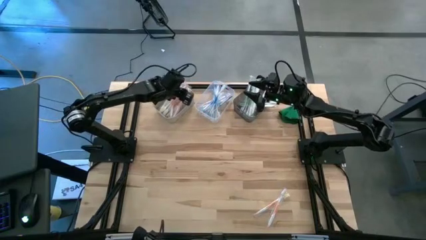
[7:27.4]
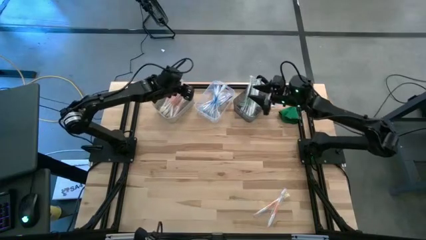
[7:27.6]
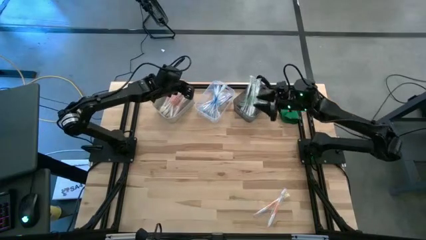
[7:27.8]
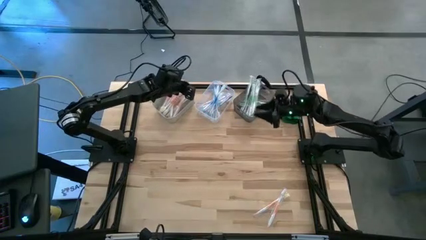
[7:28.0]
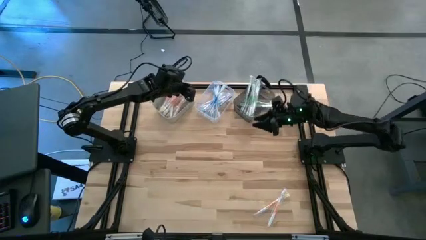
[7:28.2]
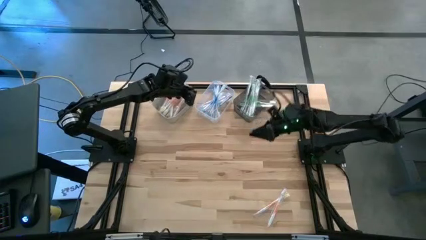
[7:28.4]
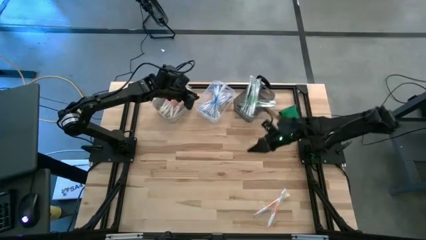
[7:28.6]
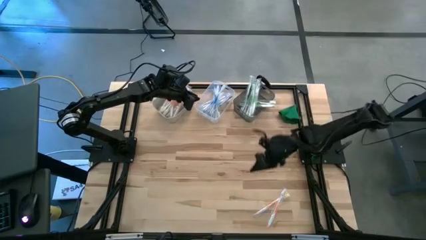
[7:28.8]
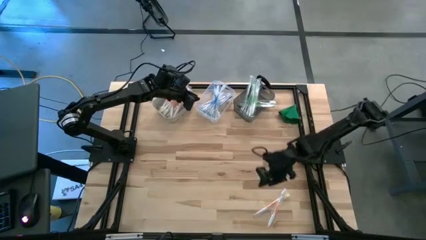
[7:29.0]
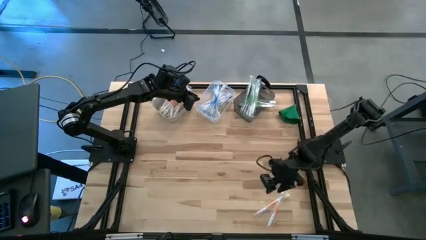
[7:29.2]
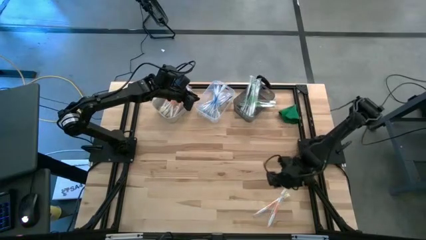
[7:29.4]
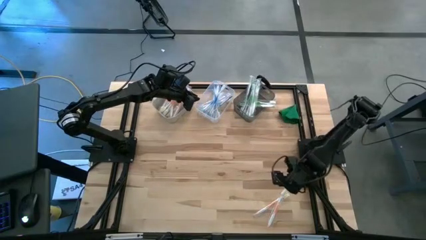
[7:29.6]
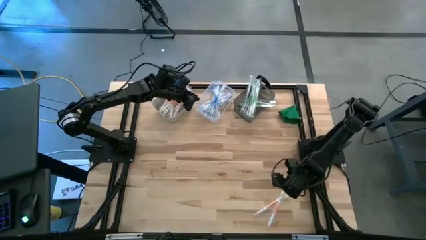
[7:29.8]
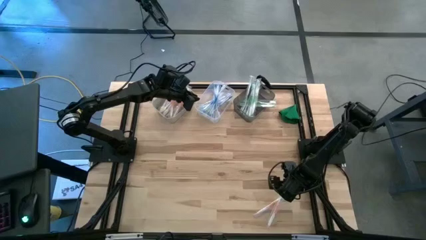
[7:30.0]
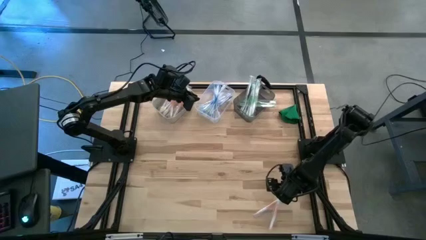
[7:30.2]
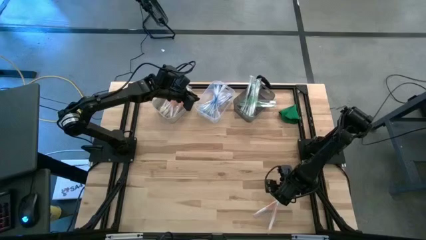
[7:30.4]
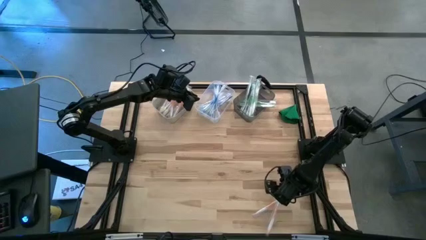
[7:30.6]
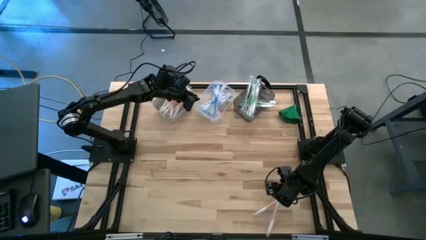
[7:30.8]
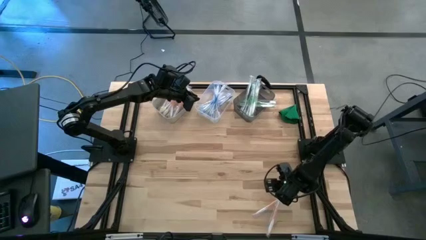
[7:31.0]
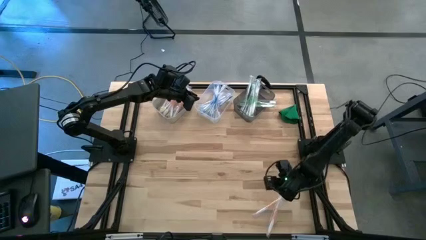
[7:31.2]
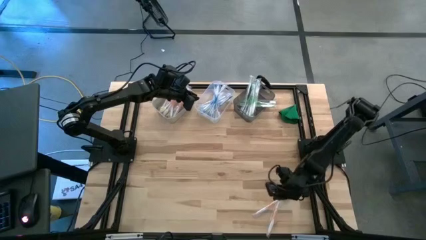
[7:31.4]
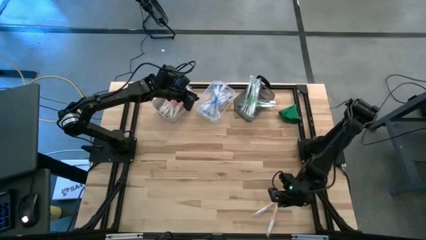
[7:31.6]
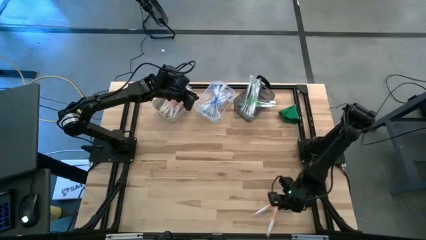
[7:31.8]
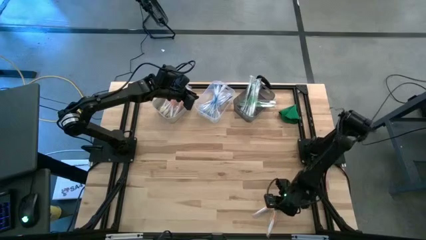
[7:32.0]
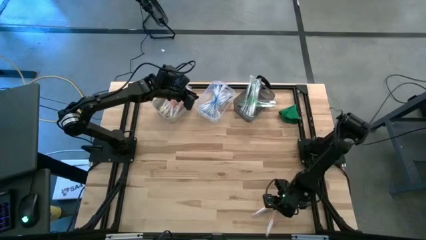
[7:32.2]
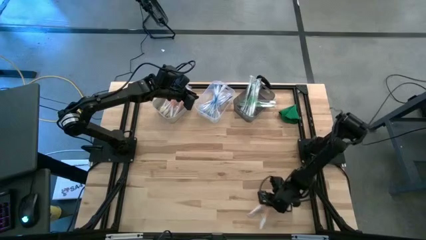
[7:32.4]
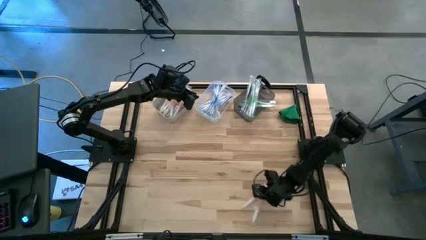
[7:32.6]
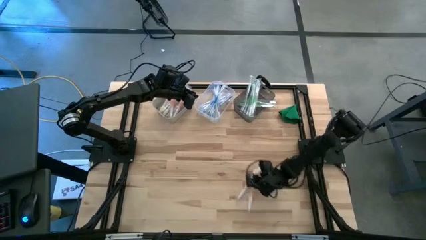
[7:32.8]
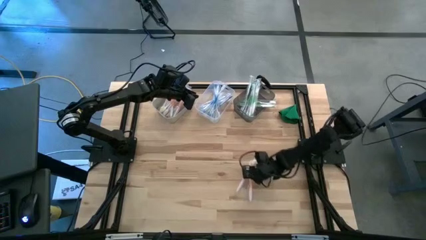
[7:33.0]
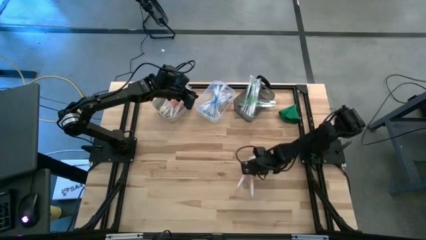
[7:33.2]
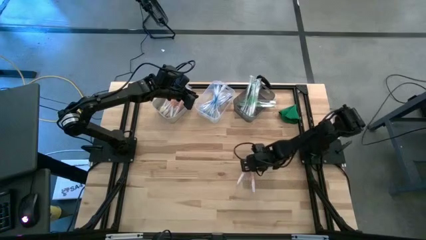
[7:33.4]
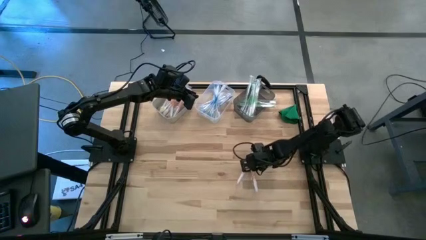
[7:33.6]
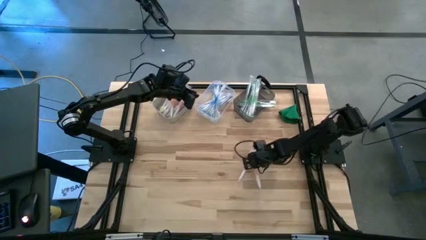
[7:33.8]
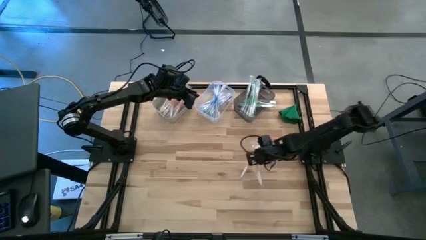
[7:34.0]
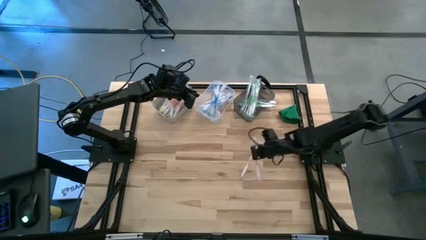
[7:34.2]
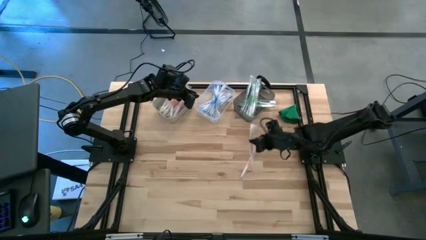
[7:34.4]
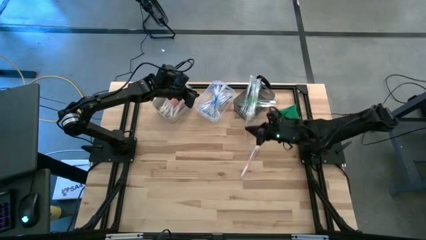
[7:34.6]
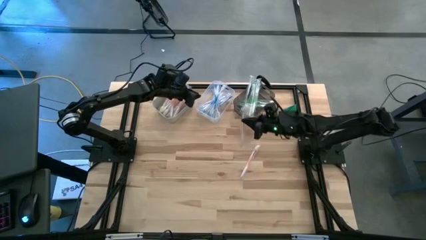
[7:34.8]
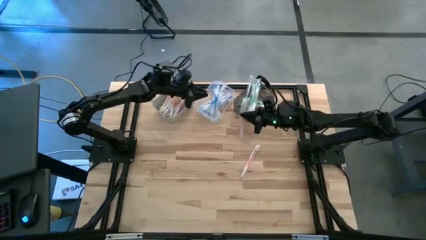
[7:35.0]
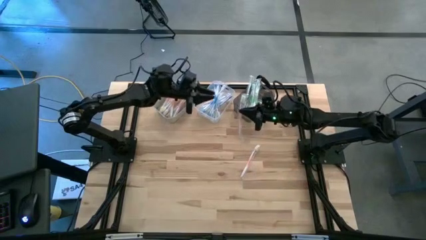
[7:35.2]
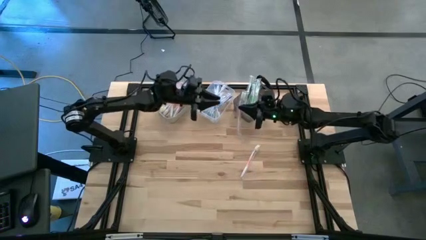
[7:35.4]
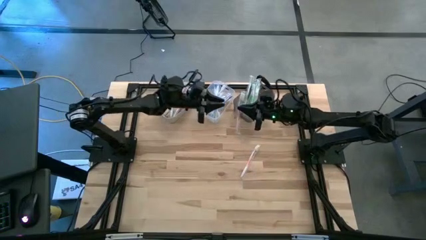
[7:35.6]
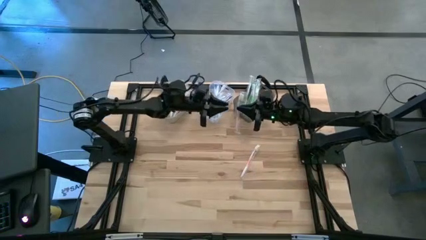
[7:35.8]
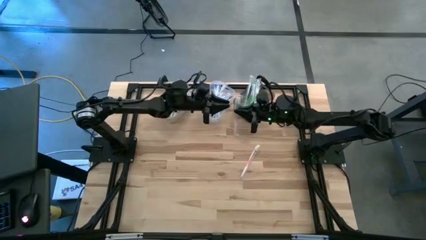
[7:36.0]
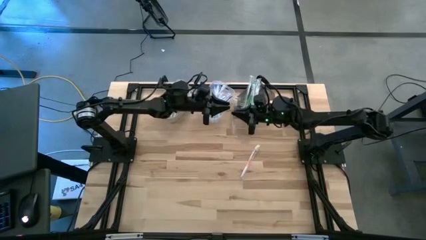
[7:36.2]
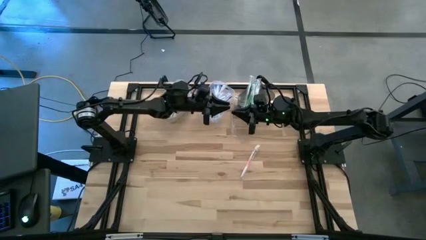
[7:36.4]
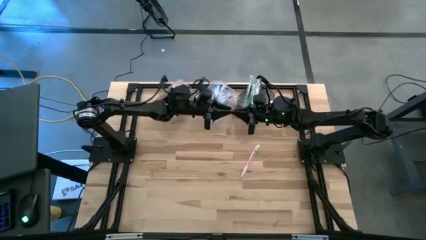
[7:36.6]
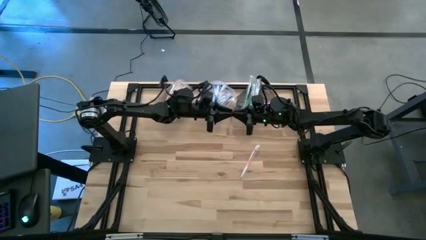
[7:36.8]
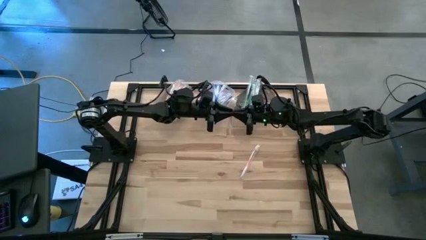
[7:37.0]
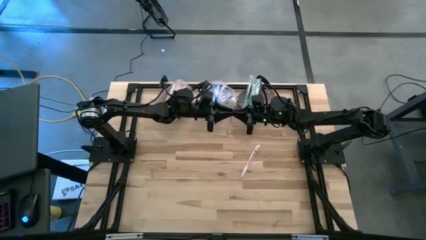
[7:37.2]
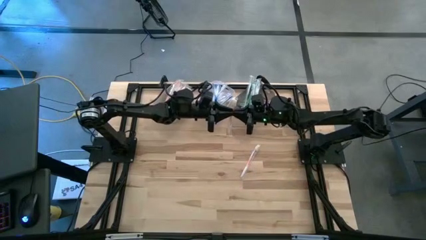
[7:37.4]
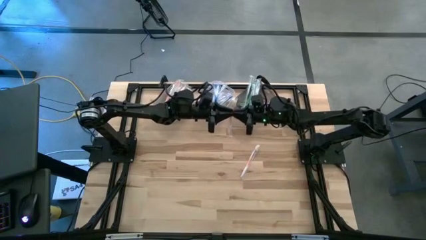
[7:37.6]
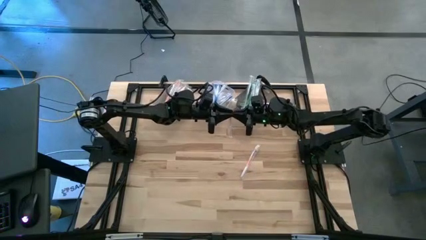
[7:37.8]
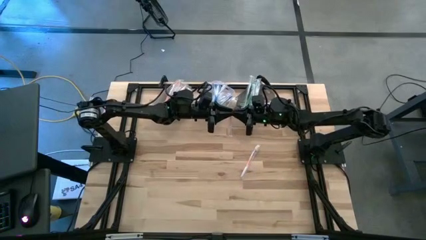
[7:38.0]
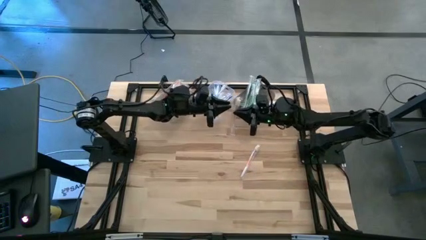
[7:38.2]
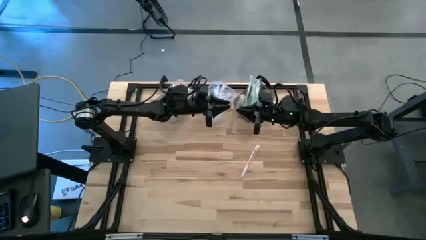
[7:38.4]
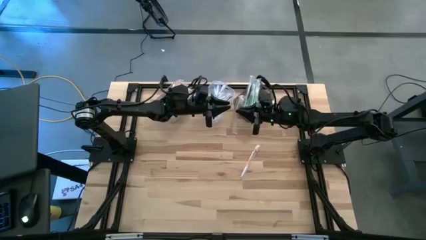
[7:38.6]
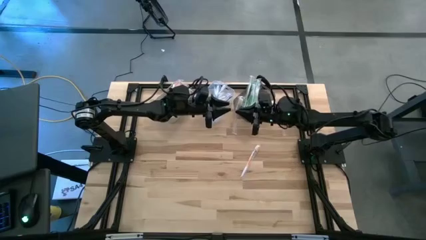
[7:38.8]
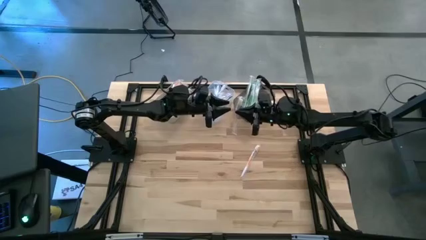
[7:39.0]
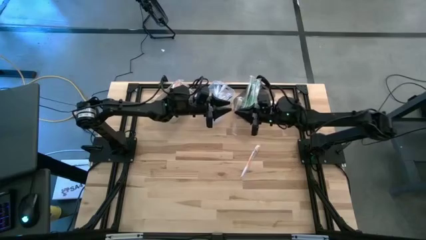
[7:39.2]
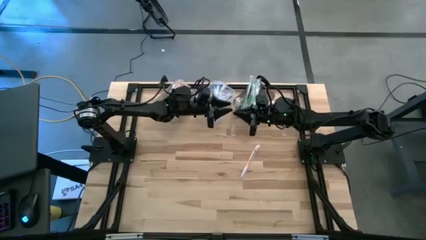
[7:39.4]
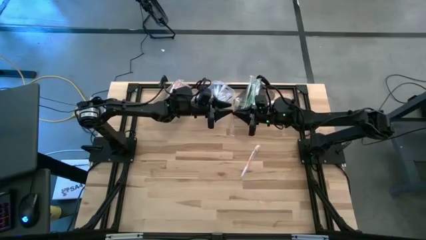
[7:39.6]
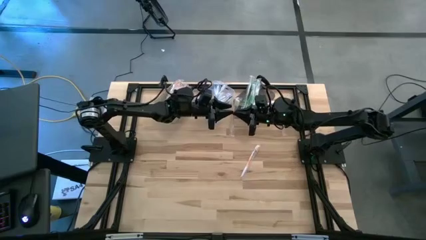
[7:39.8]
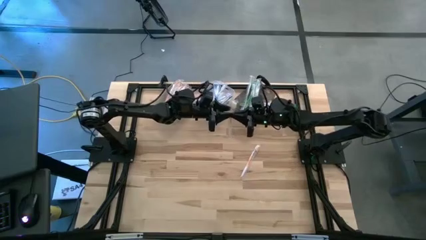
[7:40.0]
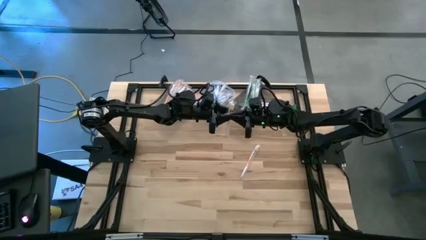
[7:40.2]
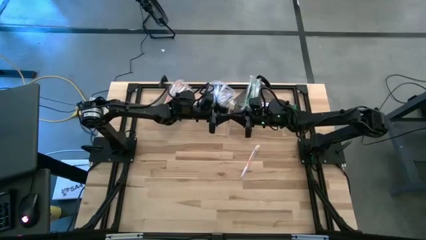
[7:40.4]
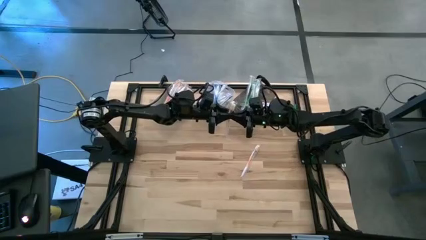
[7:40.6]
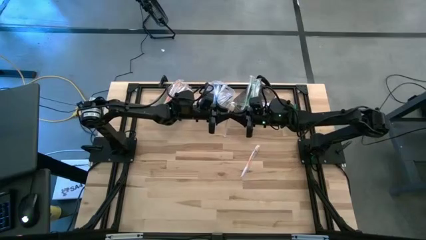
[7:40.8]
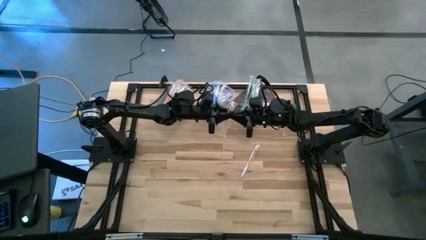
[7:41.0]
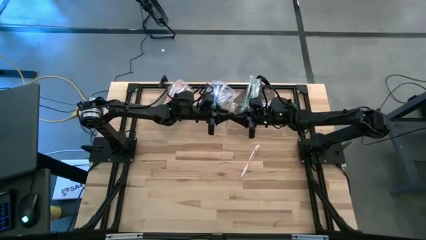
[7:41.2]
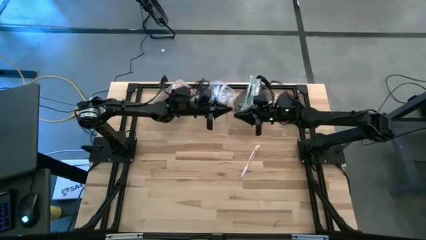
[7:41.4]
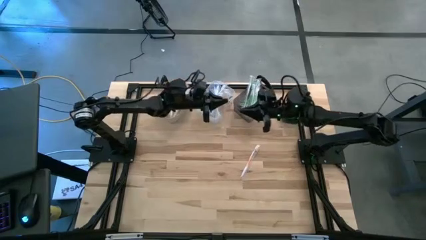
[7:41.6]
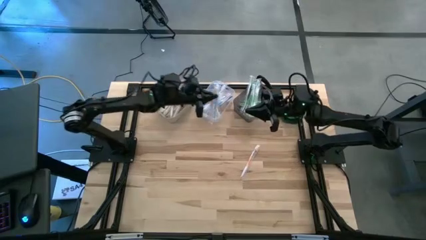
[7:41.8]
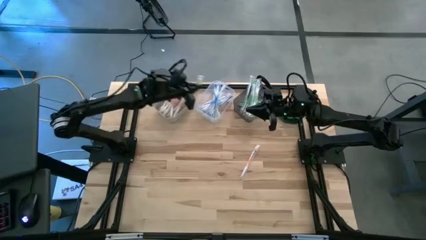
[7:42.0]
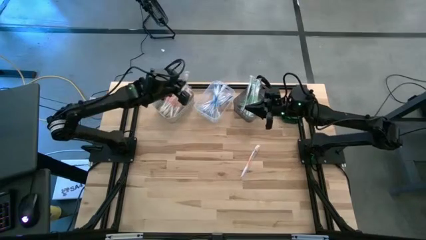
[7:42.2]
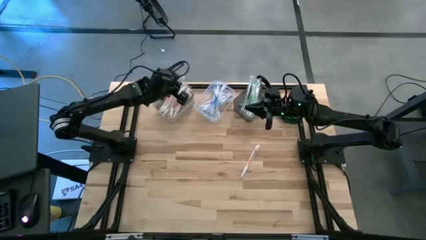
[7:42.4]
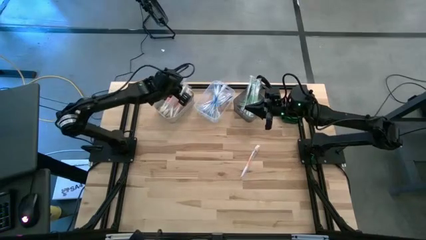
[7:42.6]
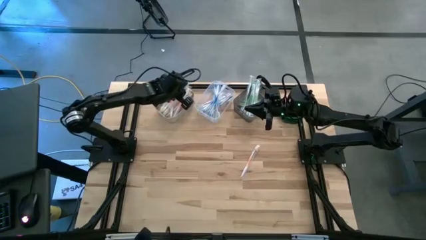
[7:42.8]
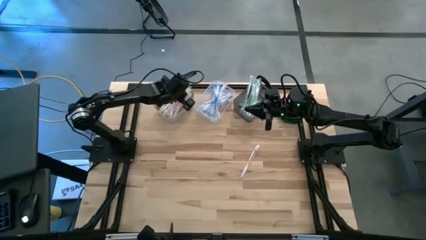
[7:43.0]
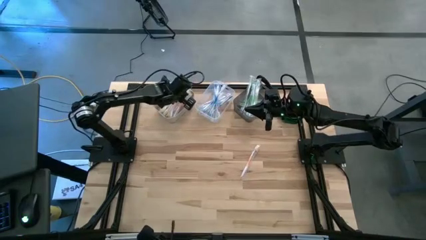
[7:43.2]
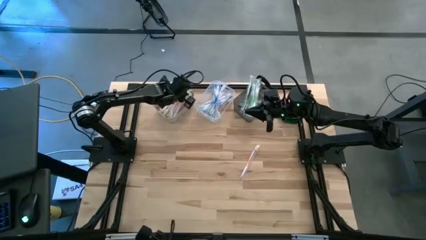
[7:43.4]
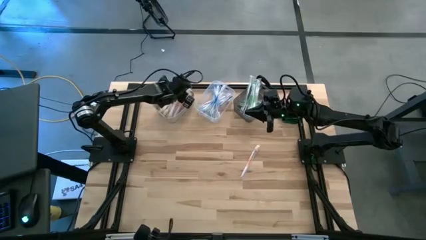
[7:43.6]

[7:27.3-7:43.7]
Task: Pick & Place Toothbrushes
Put the orange toothbrush into the white bin

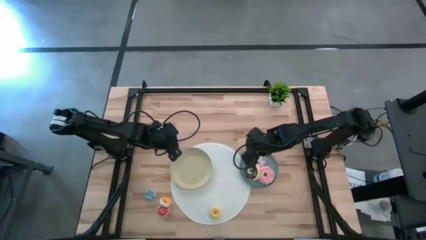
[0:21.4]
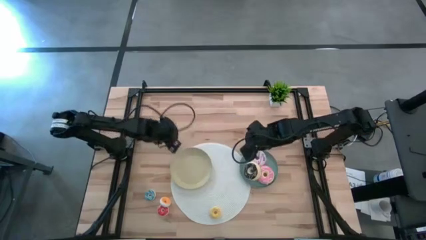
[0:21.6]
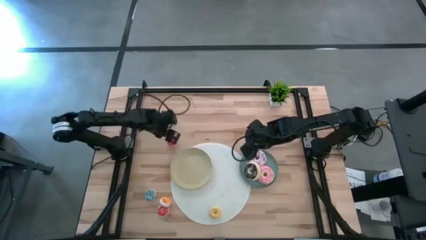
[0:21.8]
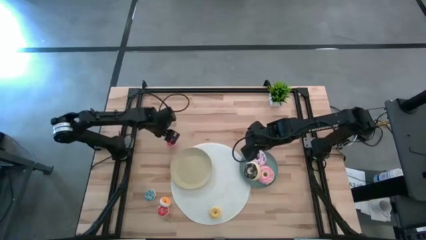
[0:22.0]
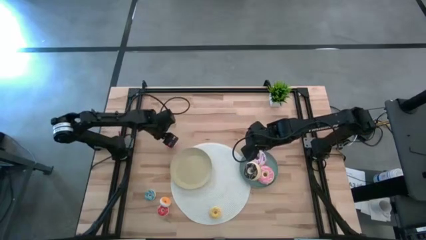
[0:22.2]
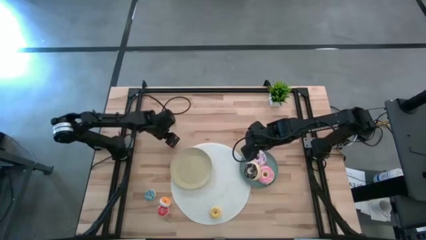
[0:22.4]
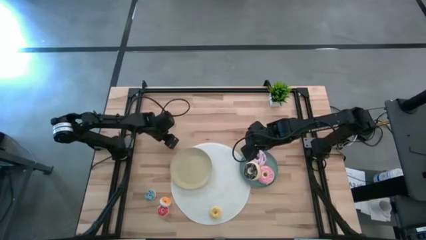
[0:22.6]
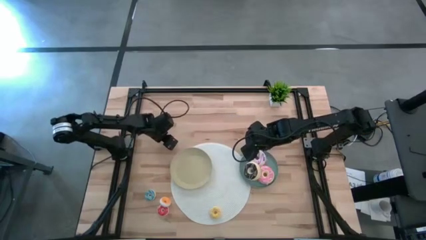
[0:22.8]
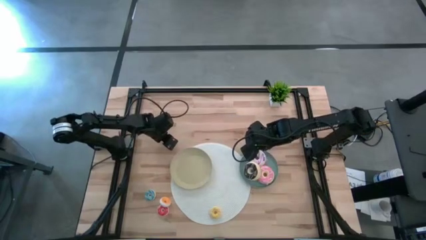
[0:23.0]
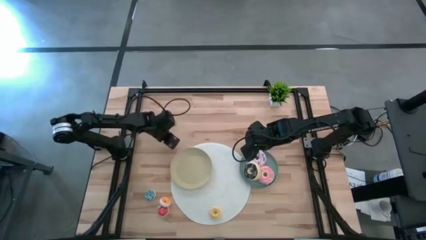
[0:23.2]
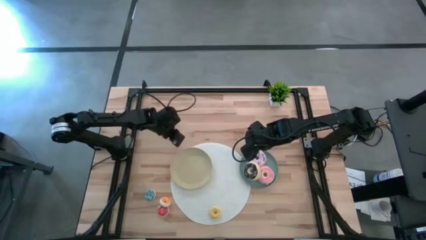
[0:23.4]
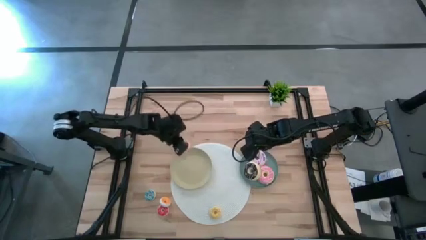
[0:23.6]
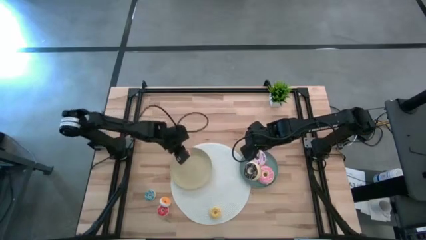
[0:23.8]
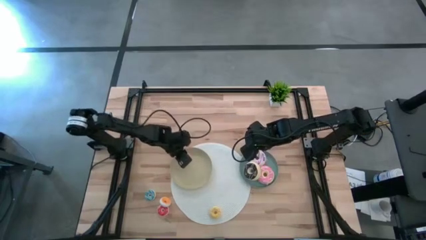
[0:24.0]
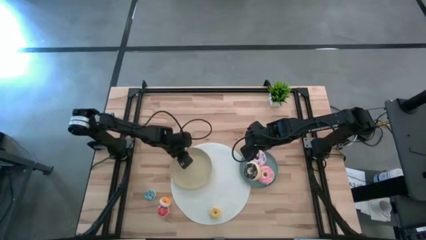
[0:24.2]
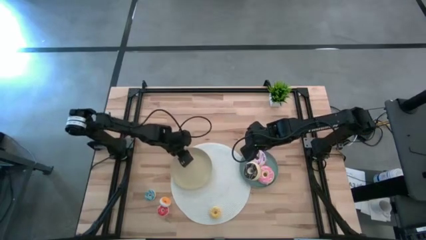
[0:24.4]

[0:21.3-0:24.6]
Task: Pick & Place donuts
Put the small red donut on the brown plate
